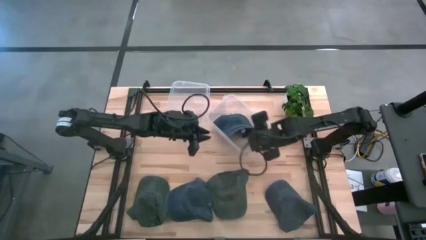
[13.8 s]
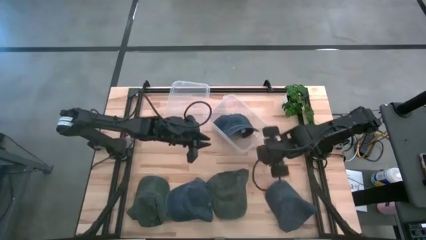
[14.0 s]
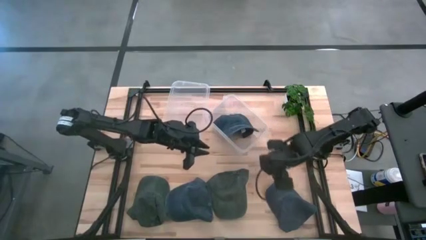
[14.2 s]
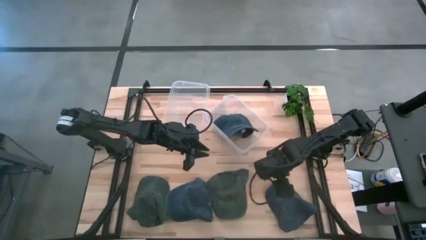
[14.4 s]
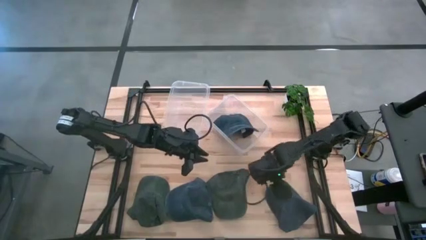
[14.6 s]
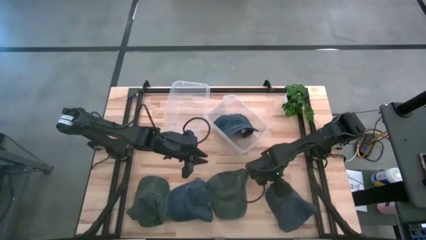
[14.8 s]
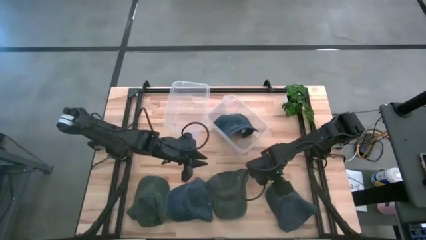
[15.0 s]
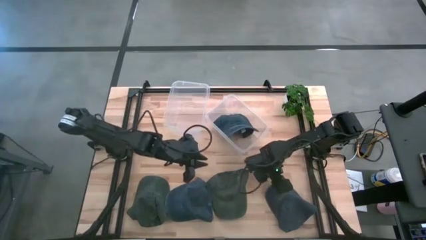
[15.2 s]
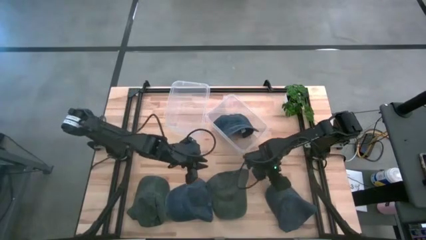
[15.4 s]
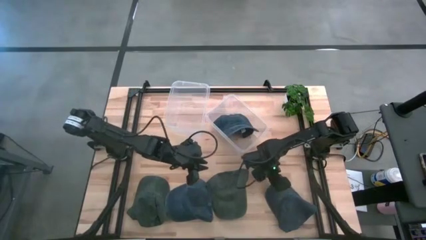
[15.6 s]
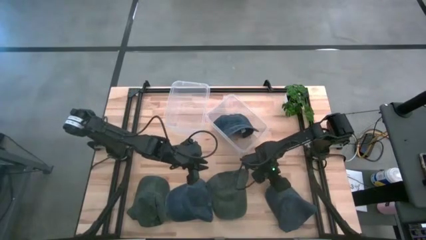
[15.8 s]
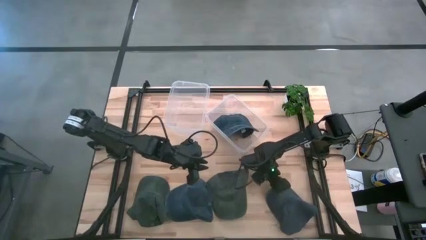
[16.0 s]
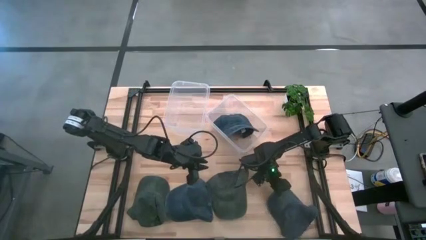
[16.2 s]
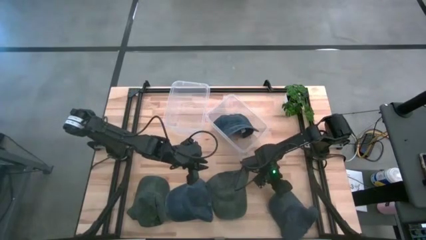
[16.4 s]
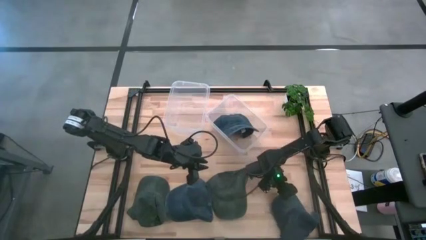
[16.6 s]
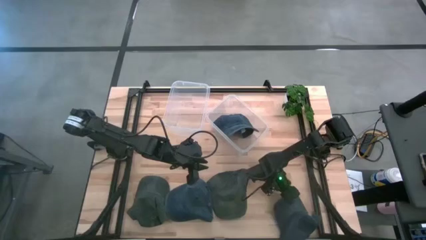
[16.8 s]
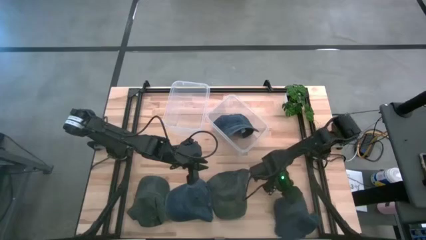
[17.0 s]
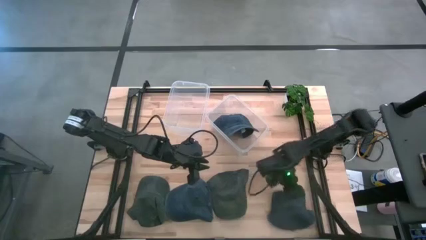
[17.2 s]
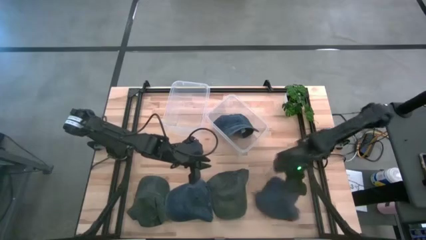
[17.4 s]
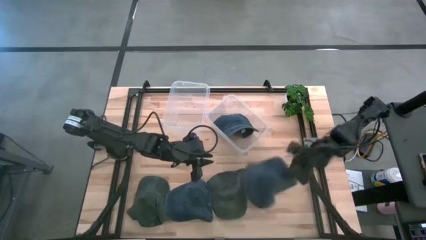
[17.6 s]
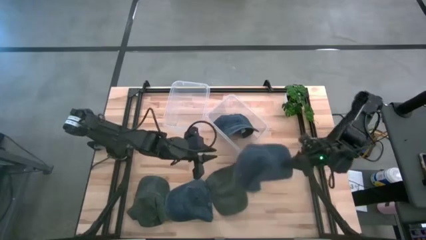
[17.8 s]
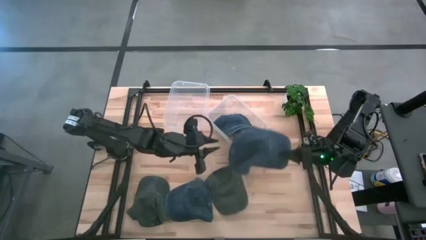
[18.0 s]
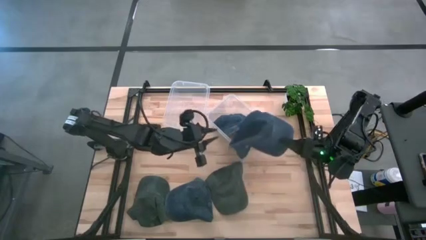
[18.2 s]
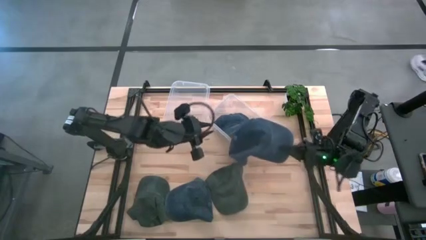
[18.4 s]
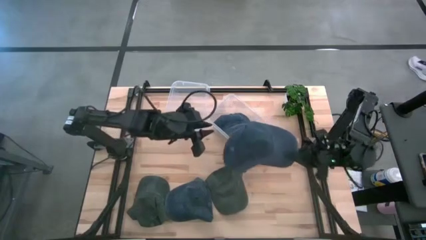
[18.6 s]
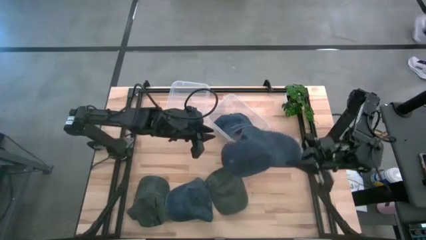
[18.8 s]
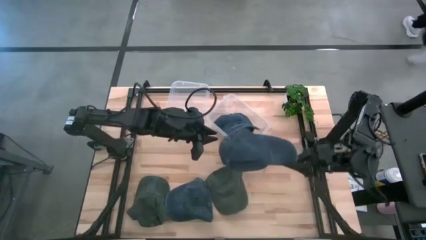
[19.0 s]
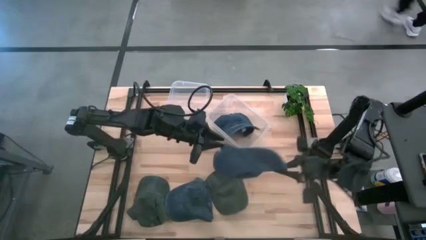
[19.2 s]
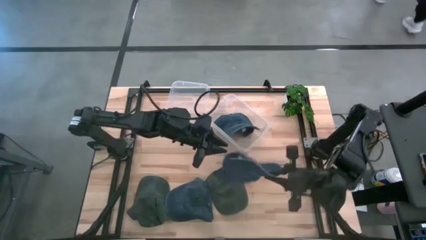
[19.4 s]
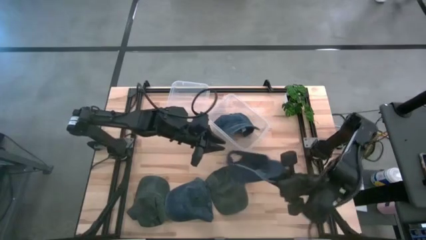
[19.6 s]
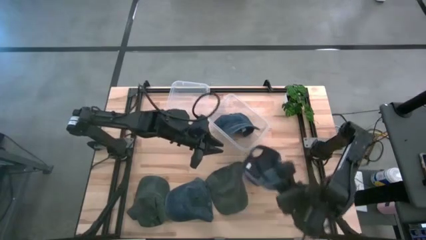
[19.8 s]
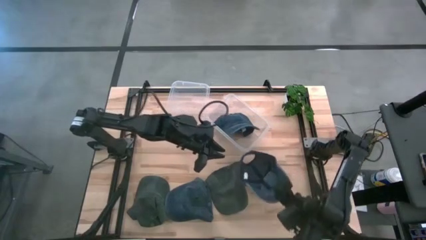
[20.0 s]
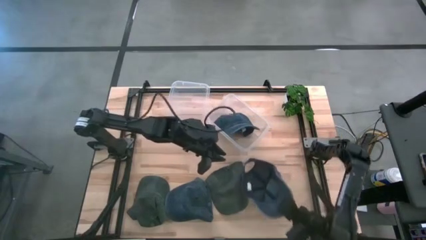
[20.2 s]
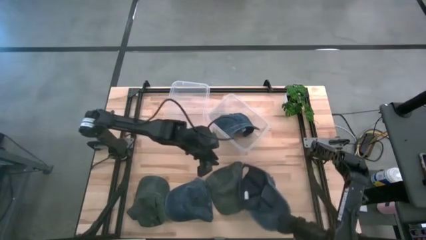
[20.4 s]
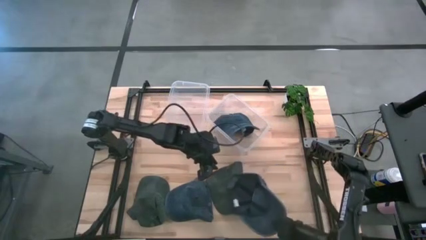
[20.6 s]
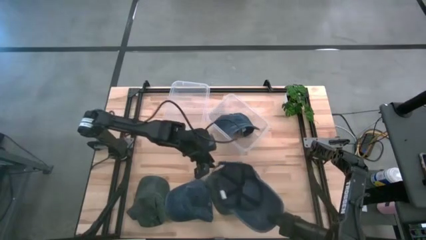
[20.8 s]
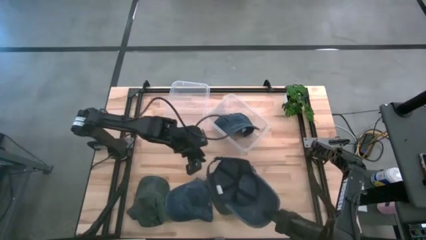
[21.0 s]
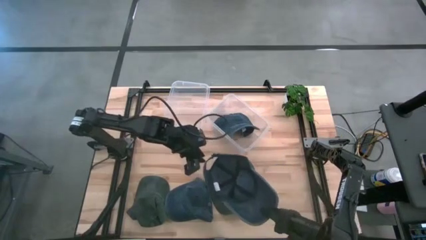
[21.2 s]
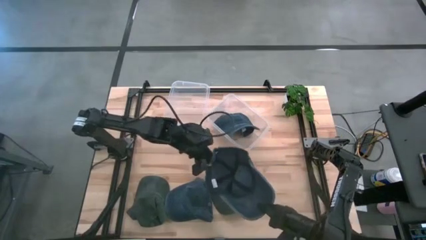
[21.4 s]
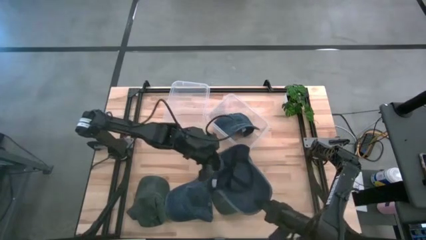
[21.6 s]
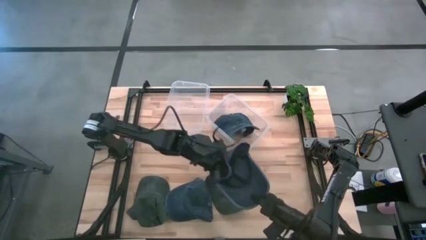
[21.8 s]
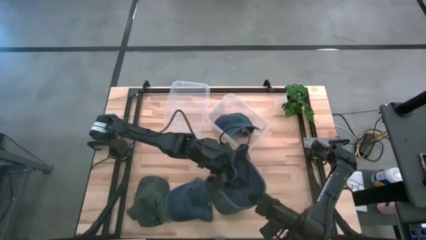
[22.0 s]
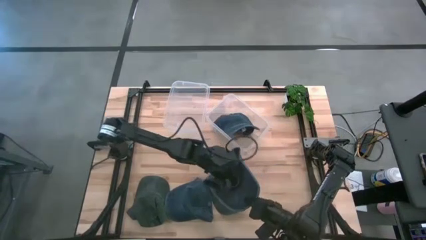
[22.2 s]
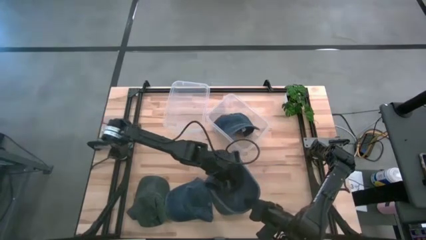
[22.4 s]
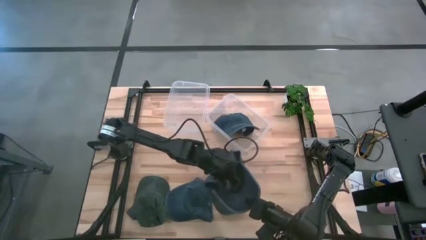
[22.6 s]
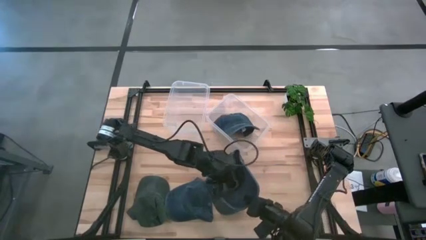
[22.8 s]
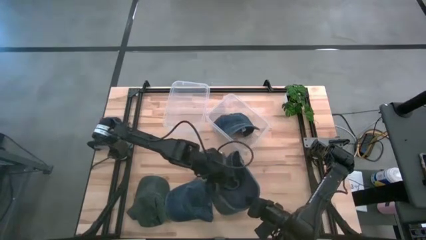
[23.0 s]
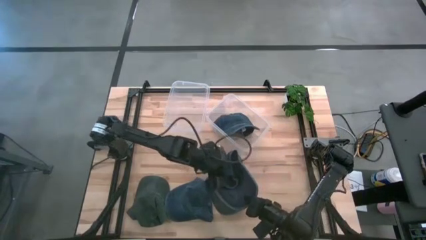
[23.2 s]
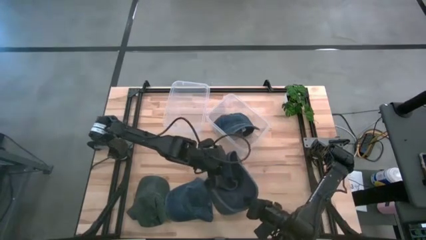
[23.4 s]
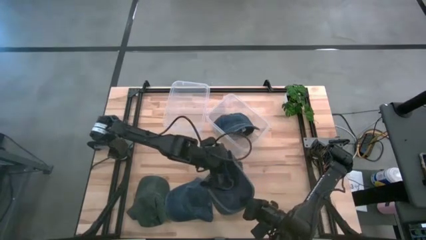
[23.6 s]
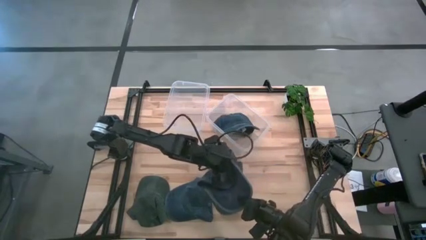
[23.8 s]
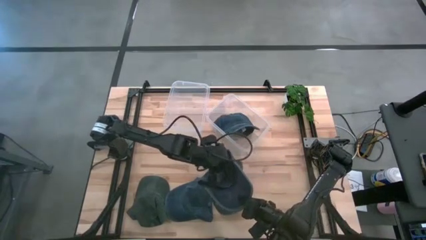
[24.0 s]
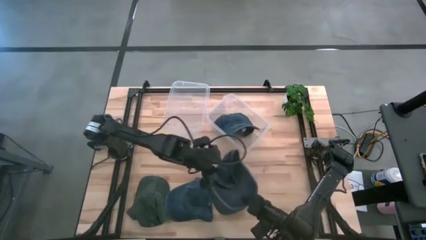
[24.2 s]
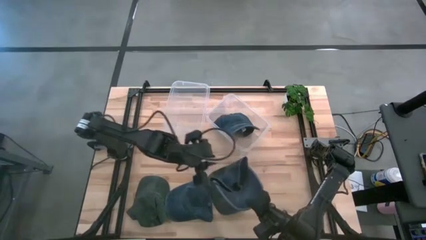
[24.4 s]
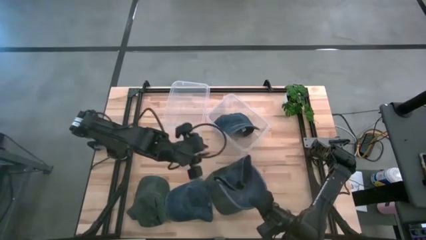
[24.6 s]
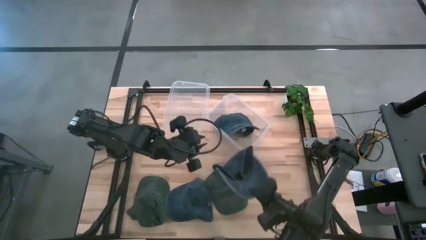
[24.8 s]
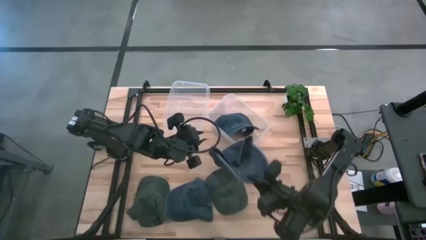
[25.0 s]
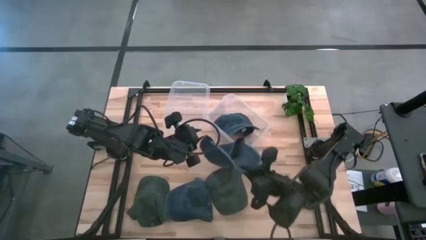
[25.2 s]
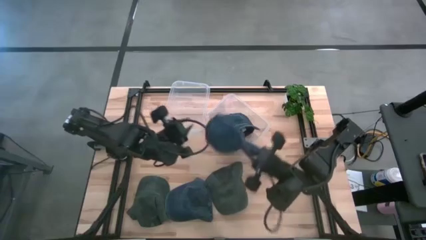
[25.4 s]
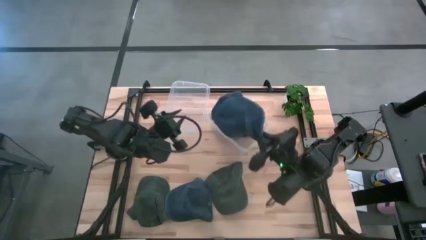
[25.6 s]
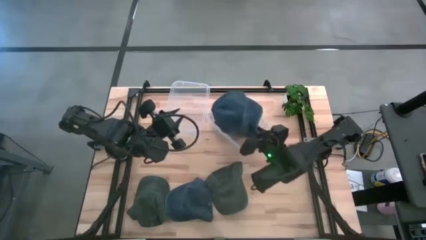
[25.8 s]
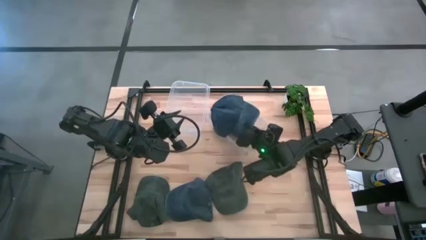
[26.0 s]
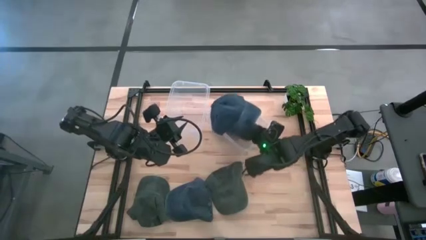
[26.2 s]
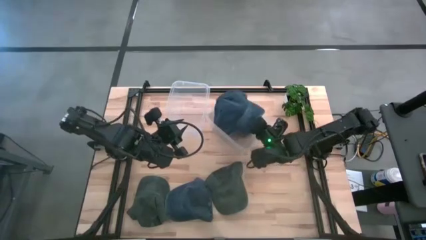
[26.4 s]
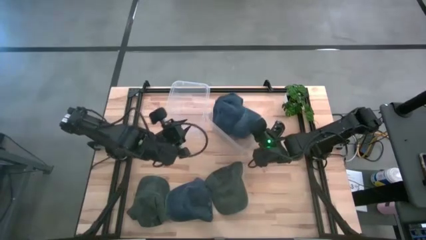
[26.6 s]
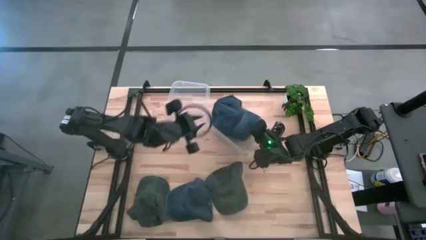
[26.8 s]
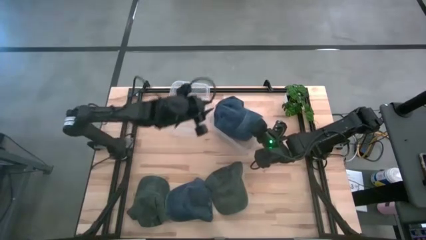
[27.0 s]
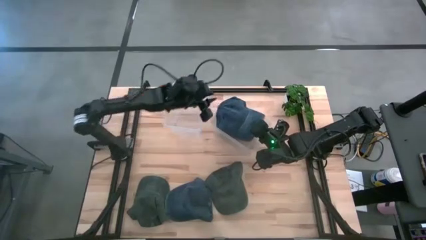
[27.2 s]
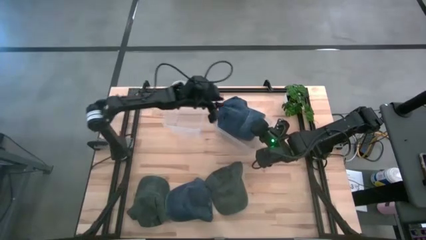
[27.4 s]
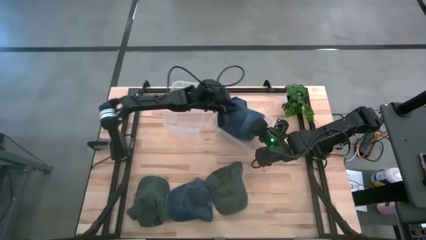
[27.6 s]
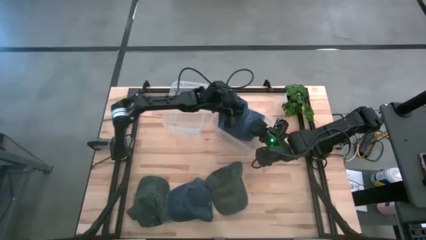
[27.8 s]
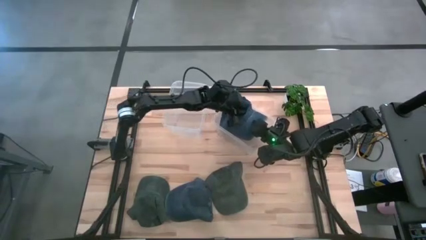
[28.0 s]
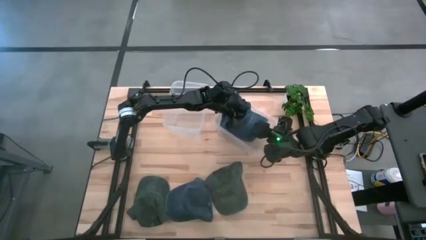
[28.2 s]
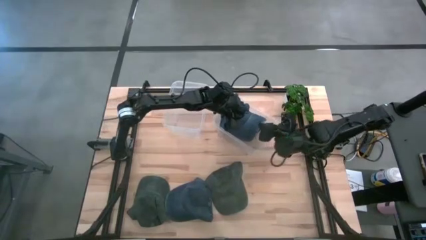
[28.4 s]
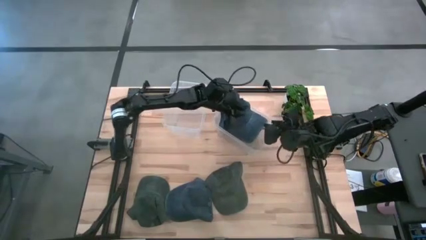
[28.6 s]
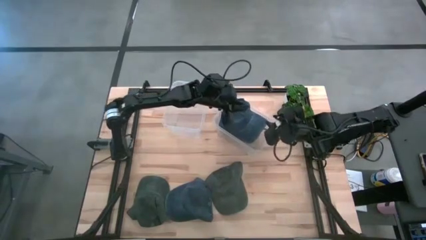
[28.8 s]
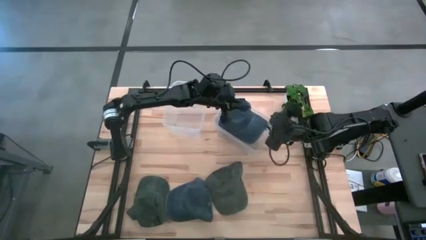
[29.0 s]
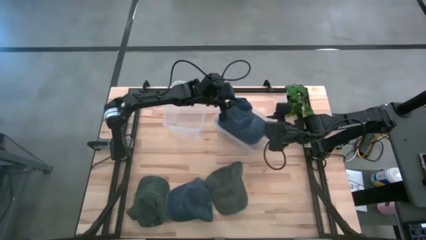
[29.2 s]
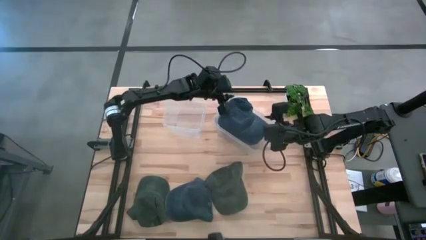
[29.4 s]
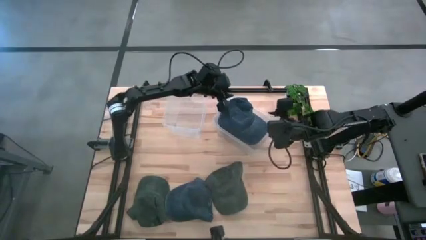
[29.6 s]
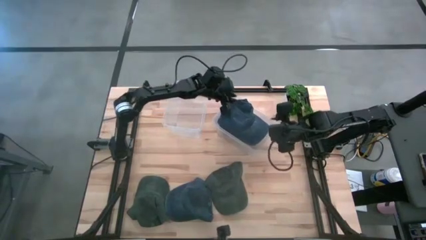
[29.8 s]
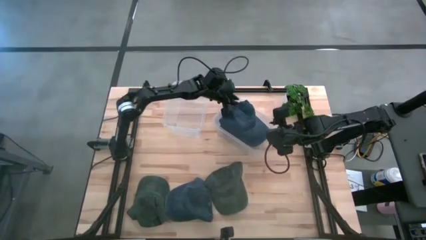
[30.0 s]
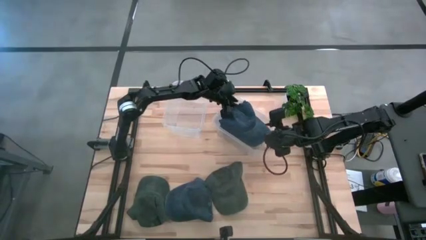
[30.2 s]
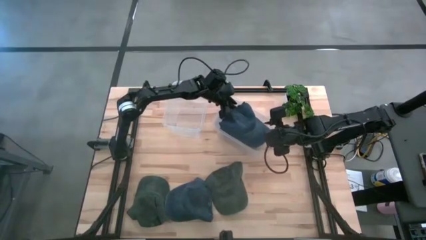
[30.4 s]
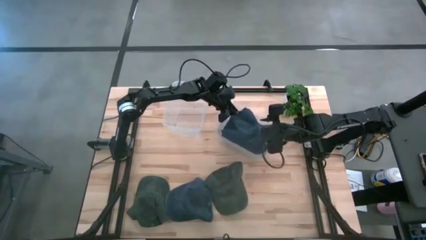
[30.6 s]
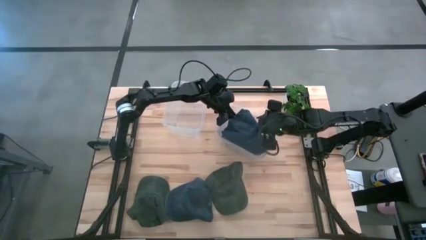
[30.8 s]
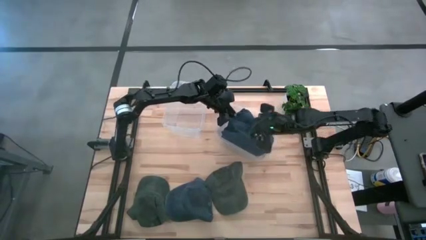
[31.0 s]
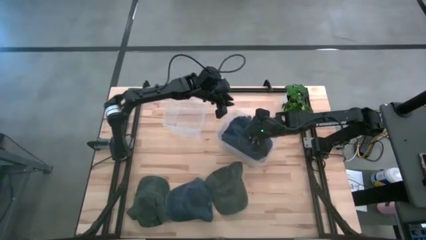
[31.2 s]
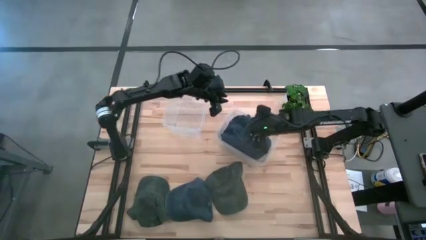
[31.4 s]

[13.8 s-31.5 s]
Task: Pick & Place hat
Put the right blue cap into the right transparent bin
